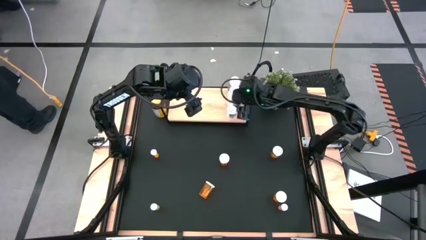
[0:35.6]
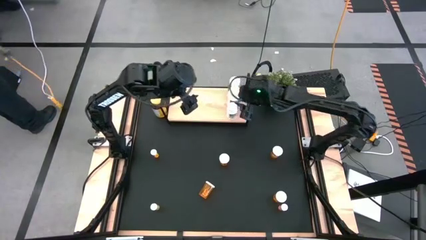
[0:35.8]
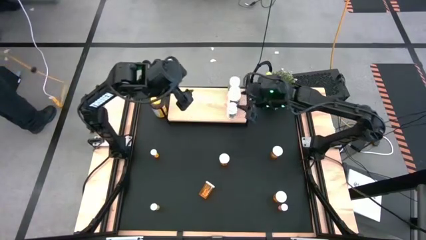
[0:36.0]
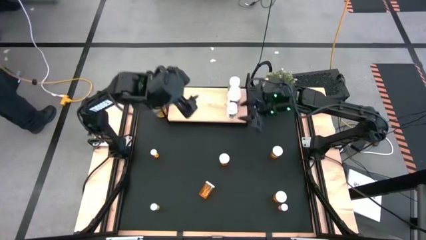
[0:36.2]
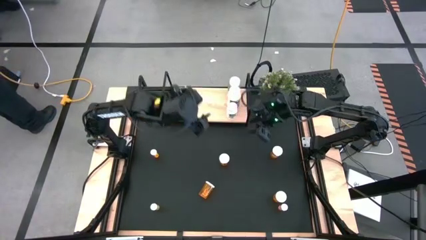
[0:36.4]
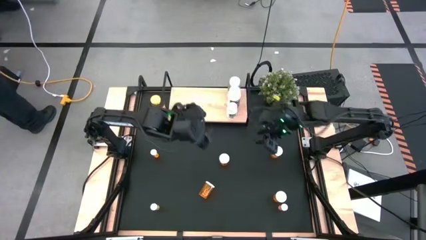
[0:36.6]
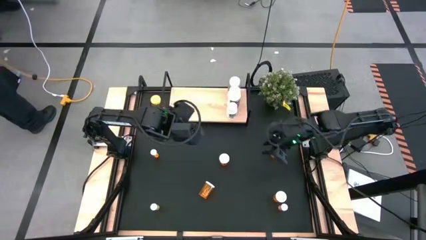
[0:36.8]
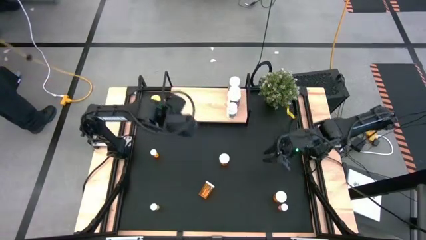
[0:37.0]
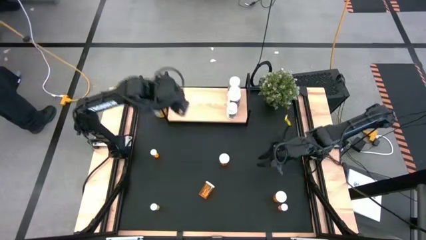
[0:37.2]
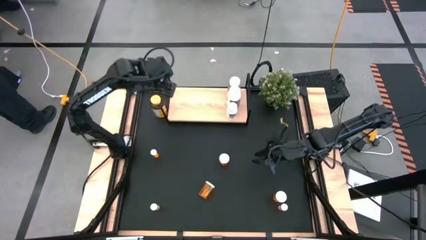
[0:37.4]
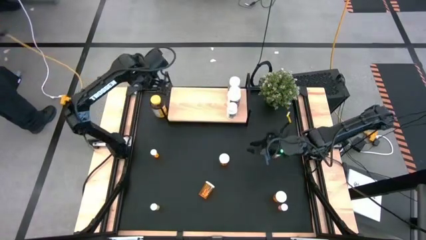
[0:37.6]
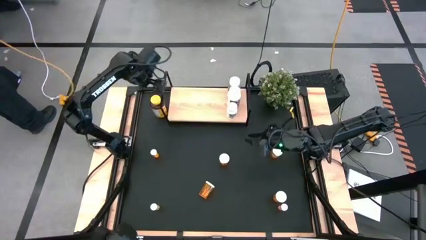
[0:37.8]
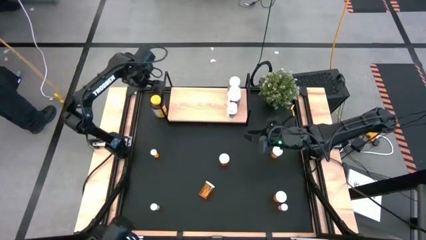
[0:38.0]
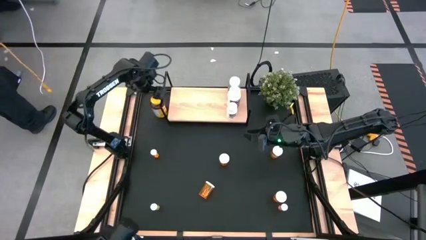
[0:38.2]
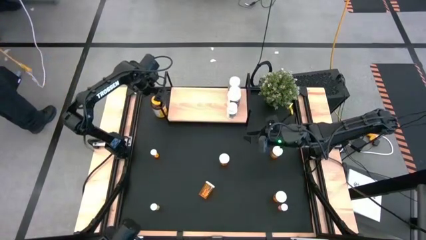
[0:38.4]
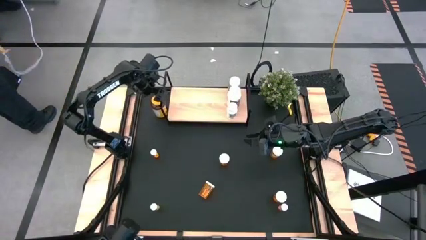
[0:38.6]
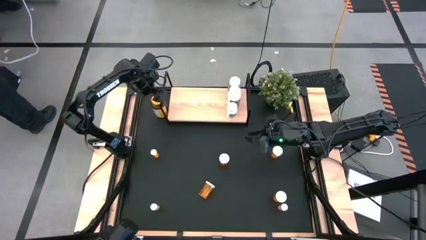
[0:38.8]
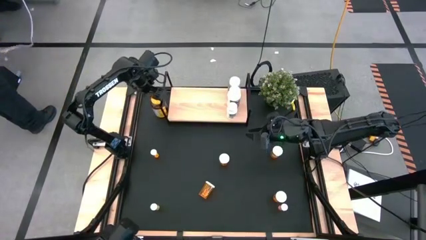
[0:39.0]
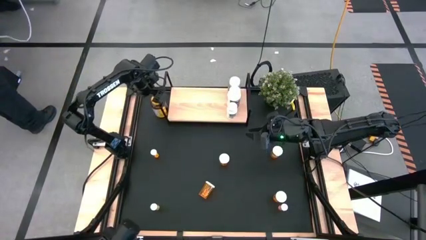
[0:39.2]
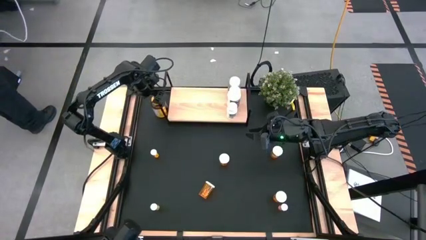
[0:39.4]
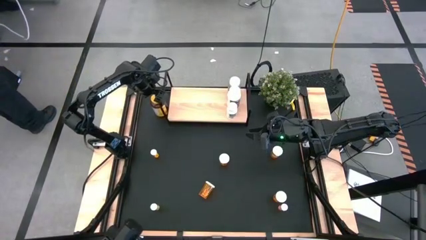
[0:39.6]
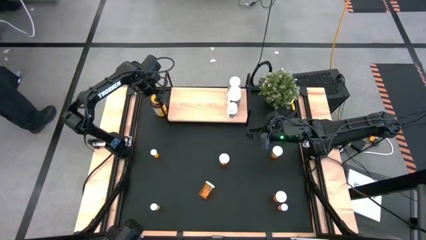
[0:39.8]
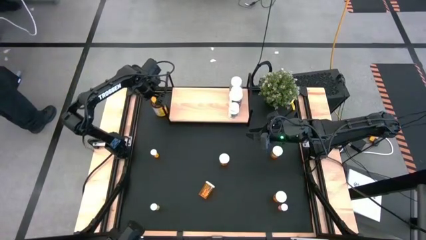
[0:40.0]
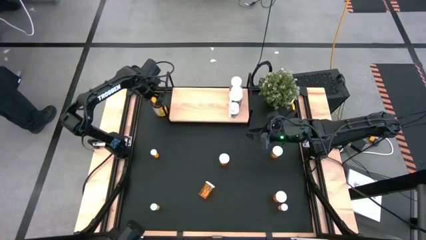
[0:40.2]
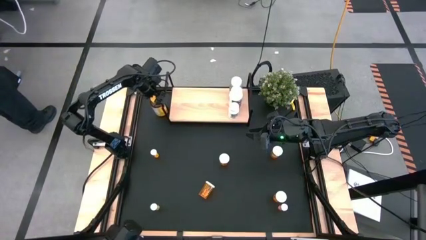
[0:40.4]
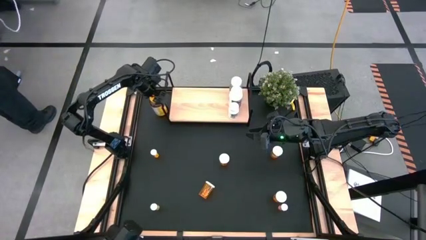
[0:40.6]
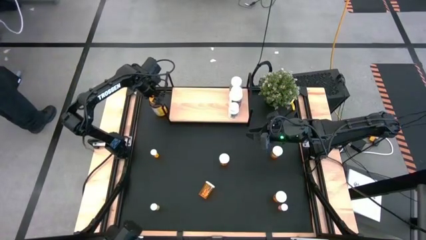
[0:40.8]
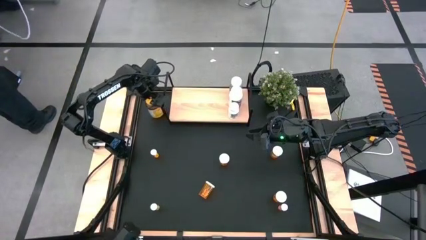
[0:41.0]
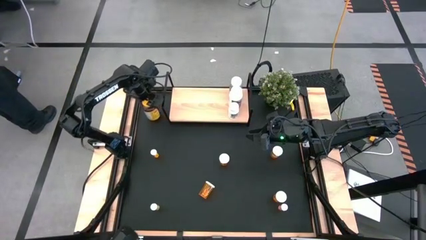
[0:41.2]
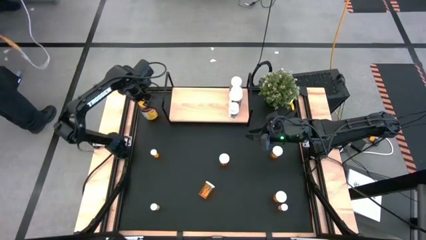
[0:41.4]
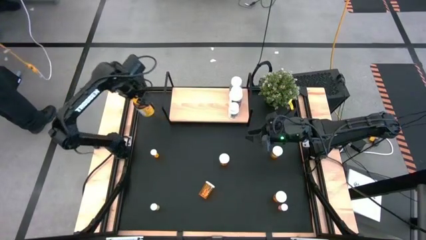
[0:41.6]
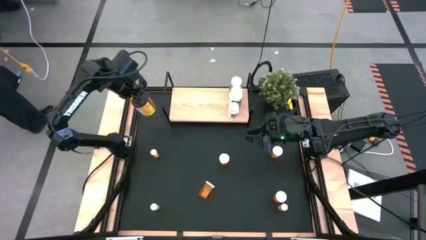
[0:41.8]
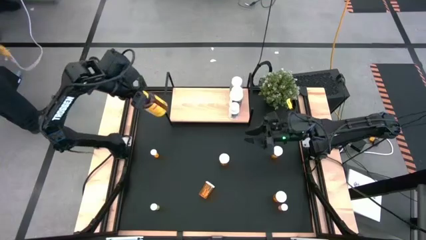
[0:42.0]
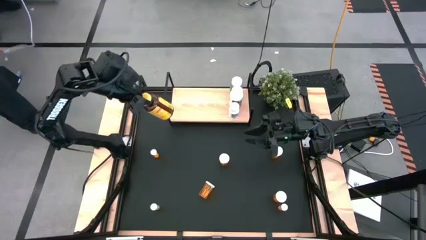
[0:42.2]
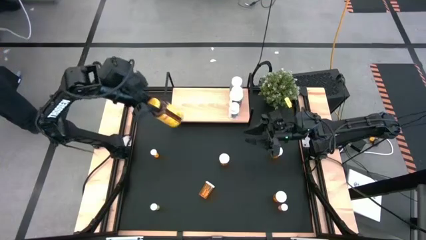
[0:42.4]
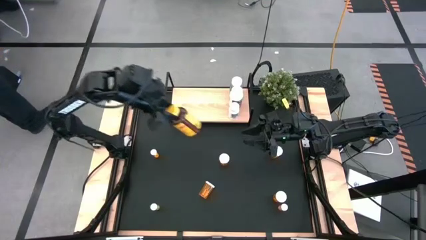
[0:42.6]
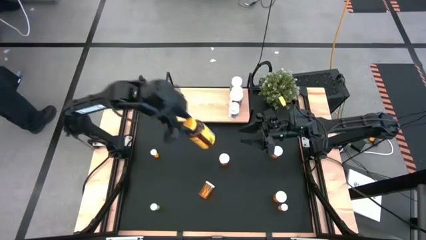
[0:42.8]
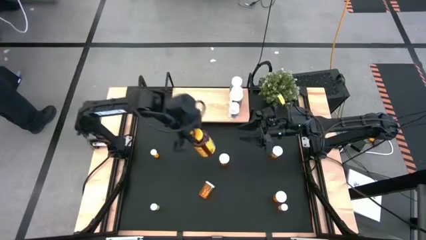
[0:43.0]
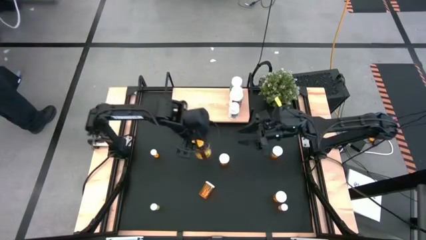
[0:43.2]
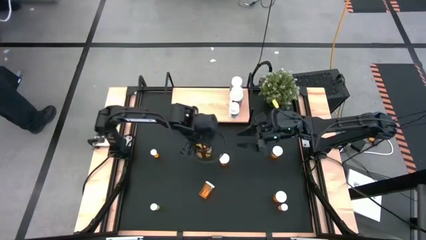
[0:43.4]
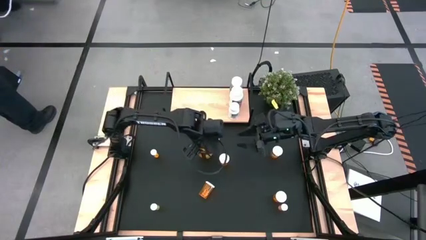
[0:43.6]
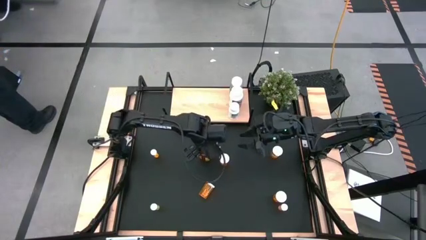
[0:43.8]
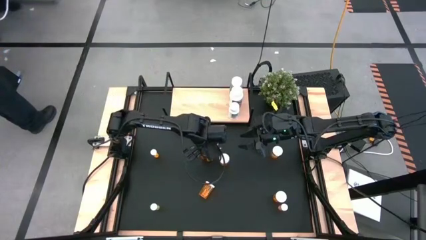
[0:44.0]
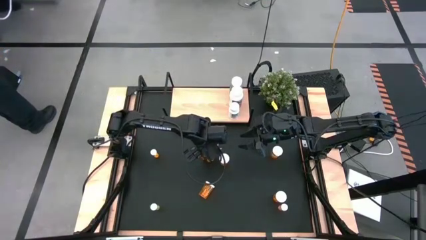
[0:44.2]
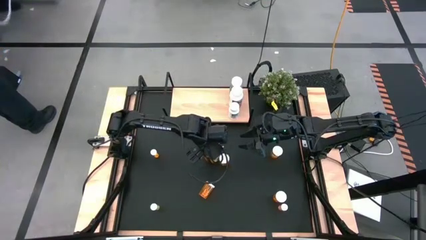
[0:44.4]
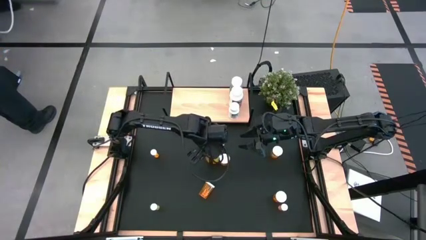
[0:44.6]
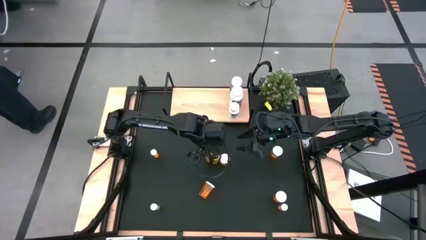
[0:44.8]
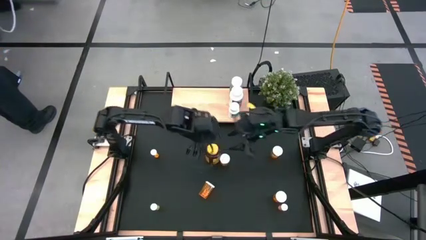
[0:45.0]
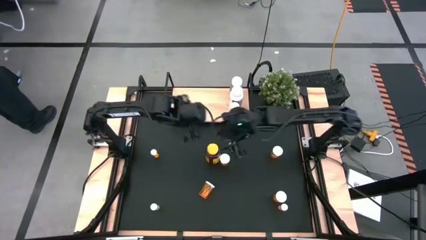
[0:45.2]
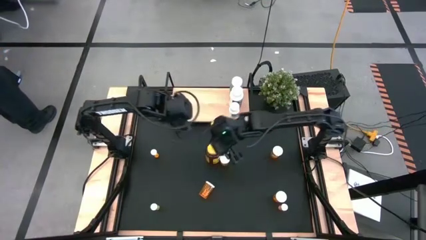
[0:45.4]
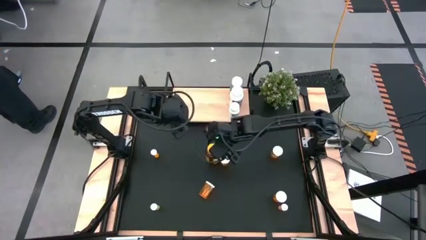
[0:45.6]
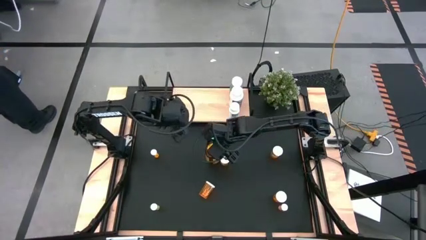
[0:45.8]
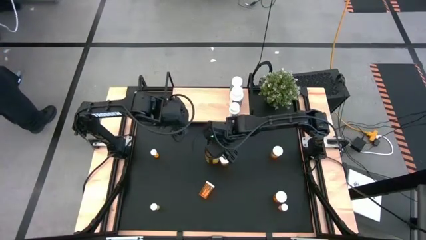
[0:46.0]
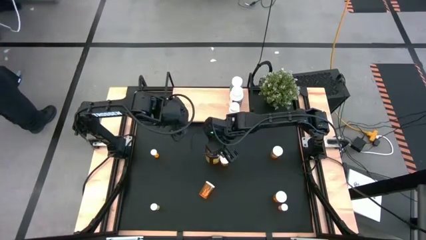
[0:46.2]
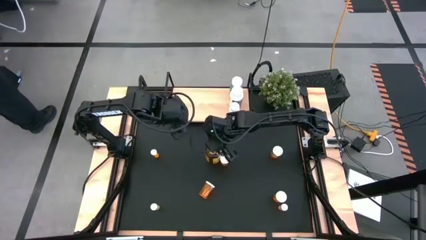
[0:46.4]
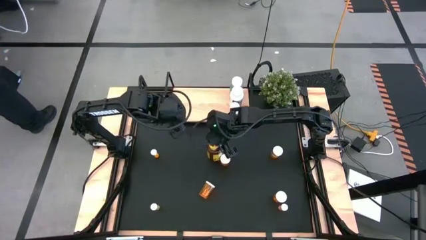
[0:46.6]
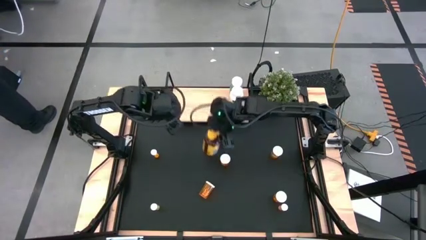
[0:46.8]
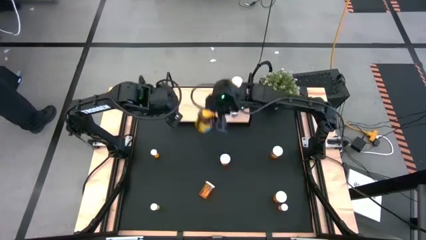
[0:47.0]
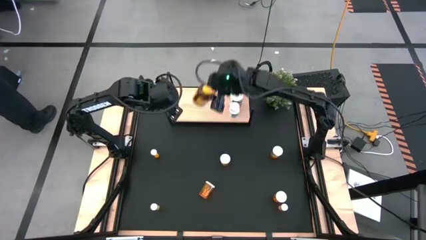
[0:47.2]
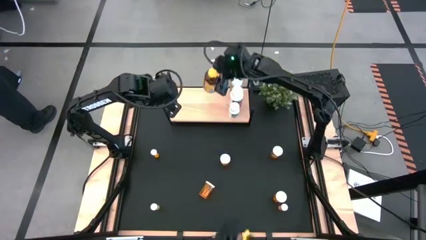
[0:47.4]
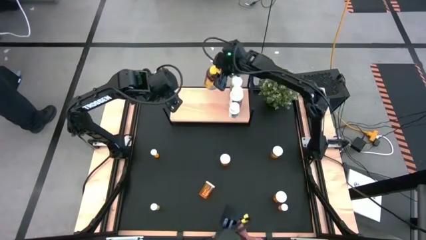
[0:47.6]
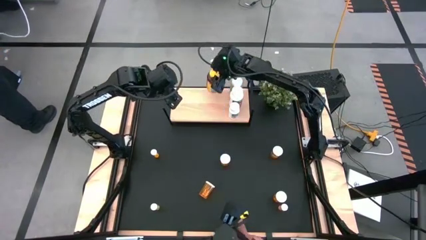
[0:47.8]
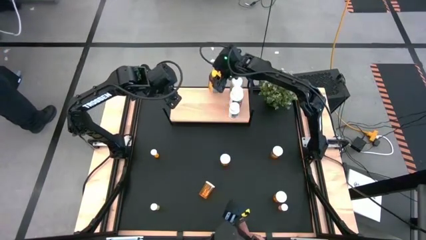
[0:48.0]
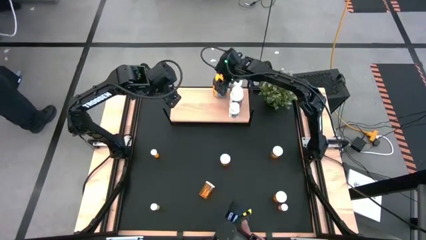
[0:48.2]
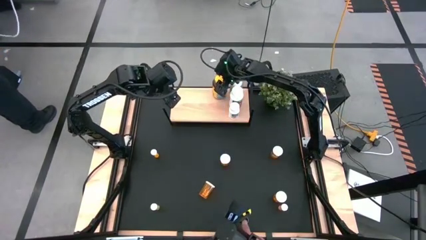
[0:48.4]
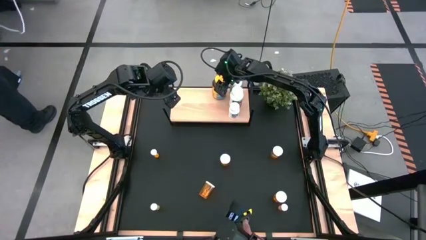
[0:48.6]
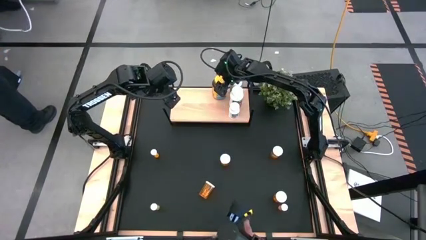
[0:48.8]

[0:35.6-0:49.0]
Task: Pick and place medicine bottles onto shelf by color
Put the top yellow pill bottle on the shelf

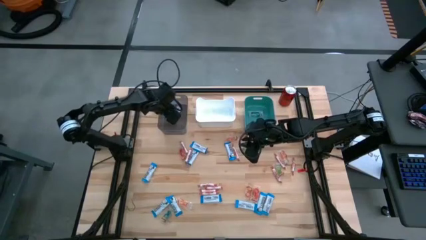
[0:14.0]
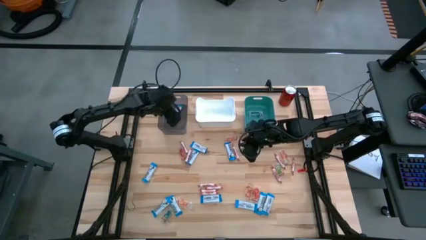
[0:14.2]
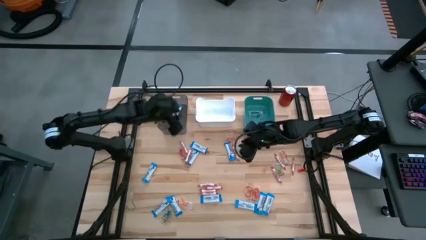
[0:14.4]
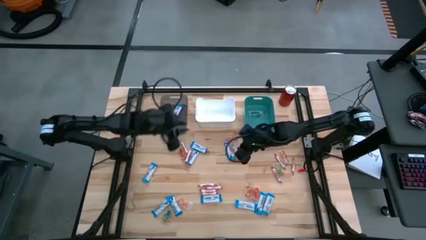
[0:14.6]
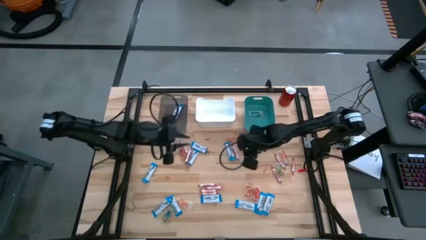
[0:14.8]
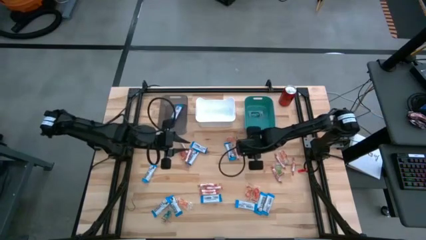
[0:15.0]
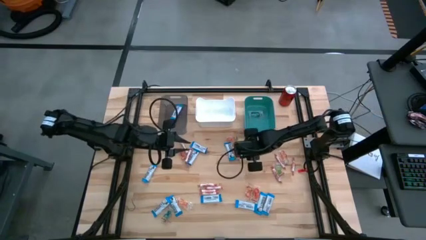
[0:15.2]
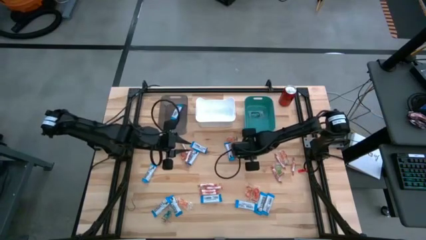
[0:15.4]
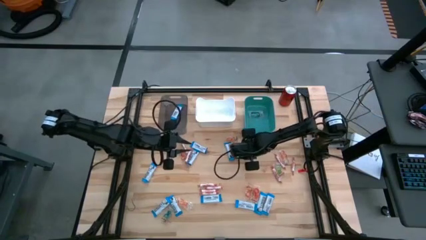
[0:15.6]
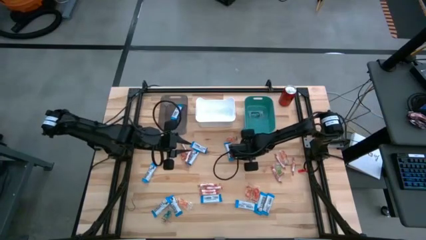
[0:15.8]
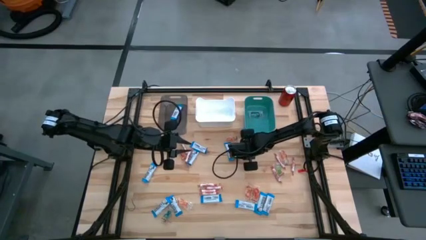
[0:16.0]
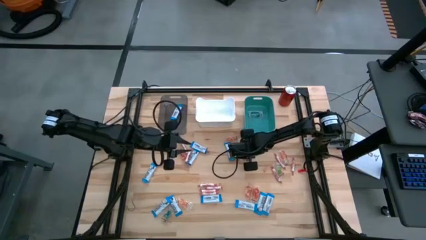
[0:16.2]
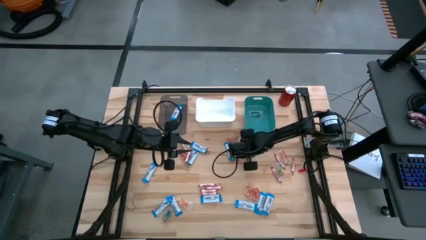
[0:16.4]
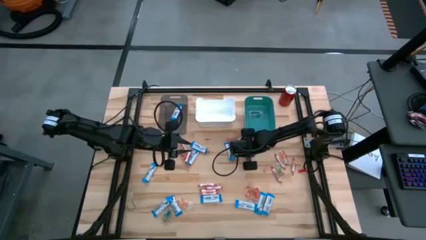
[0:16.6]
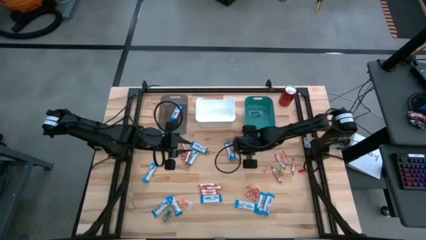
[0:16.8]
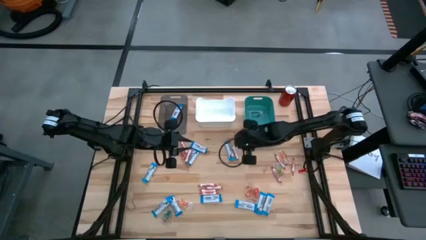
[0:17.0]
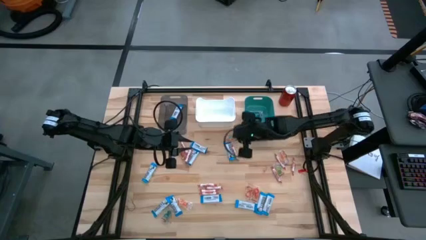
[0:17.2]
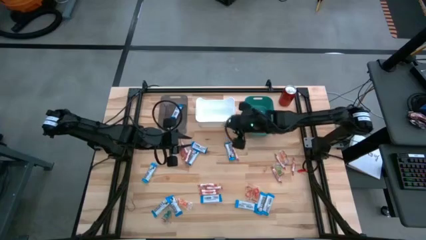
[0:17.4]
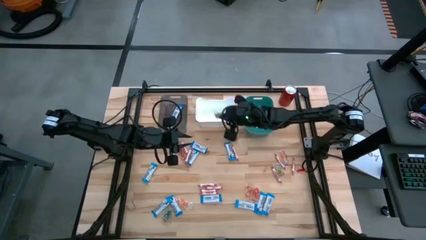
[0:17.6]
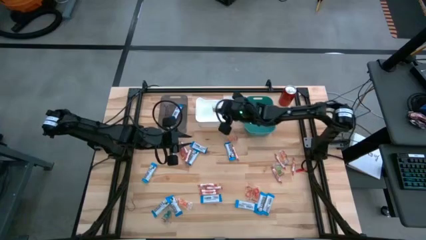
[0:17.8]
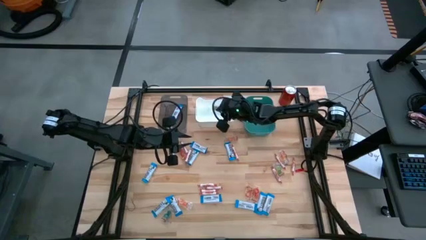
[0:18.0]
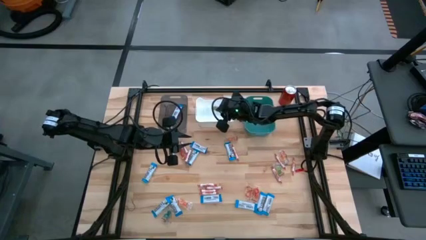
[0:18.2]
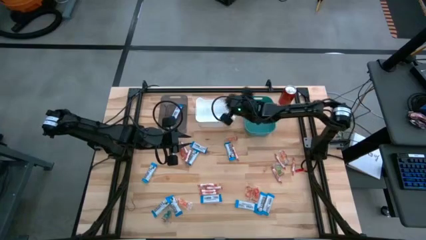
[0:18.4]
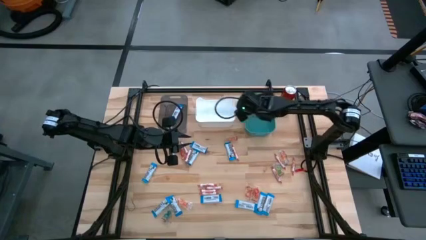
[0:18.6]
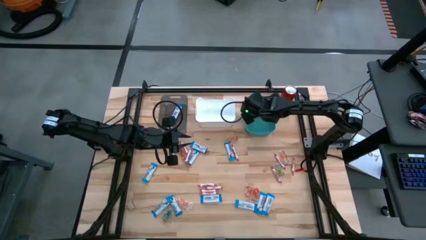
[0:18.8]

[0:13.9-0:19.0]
Task: Sort candy
Put the transparent candy into the green bin
